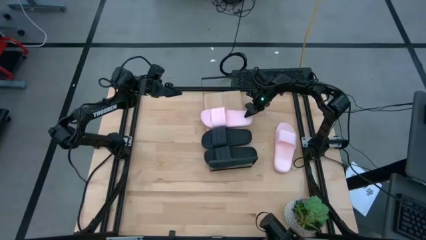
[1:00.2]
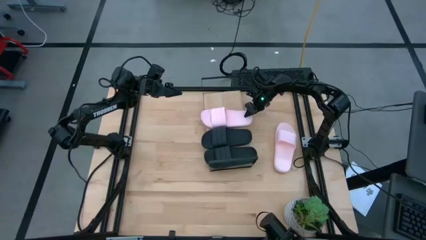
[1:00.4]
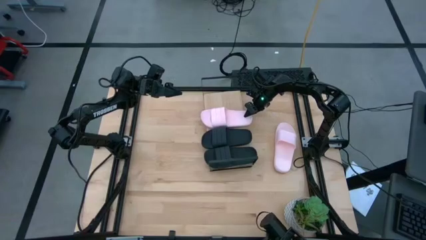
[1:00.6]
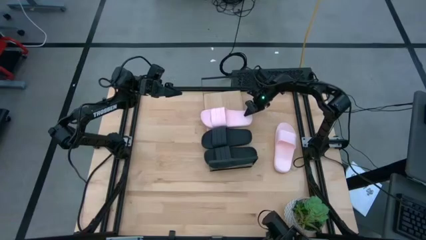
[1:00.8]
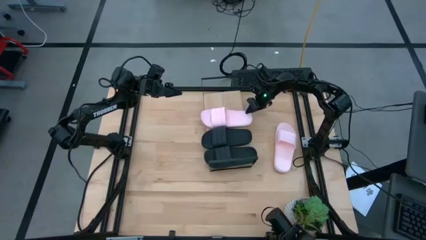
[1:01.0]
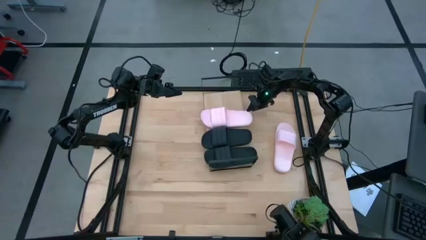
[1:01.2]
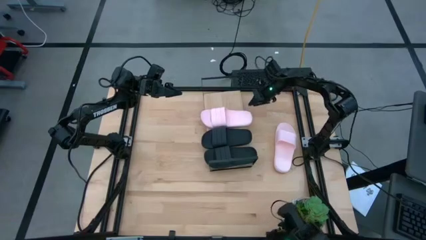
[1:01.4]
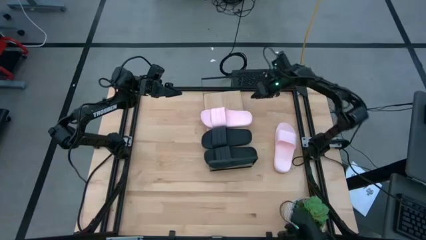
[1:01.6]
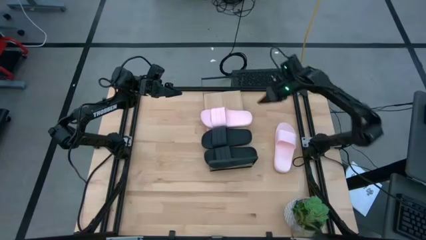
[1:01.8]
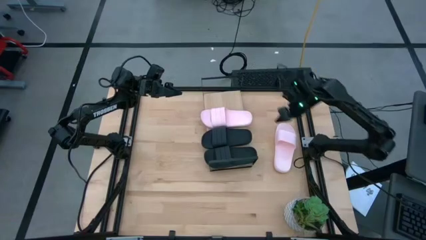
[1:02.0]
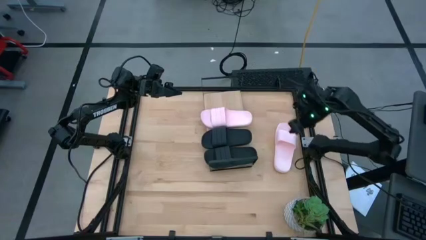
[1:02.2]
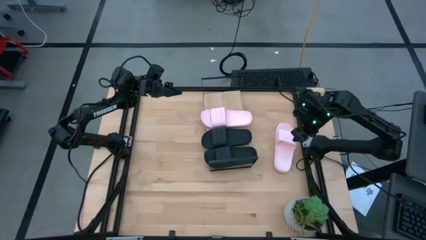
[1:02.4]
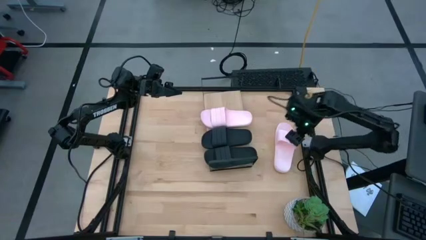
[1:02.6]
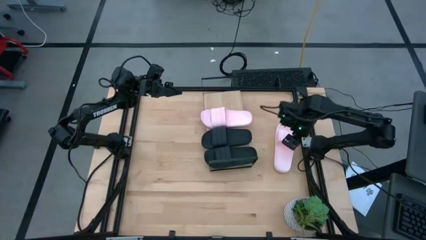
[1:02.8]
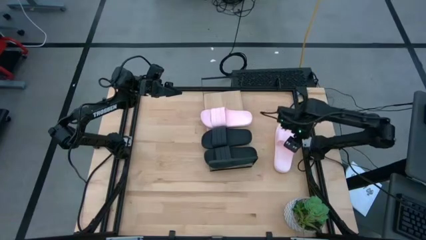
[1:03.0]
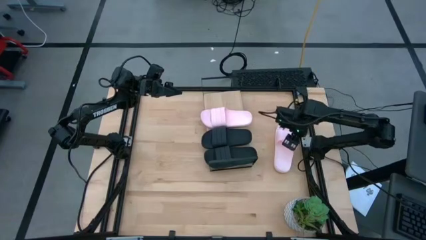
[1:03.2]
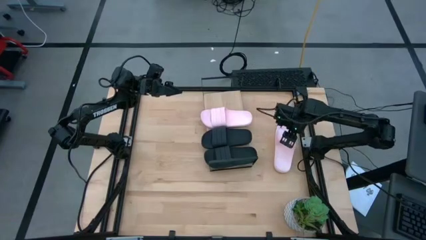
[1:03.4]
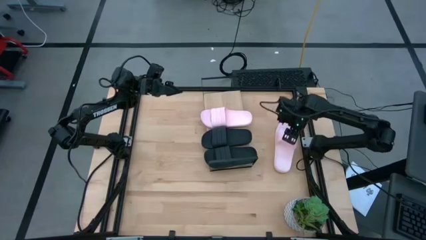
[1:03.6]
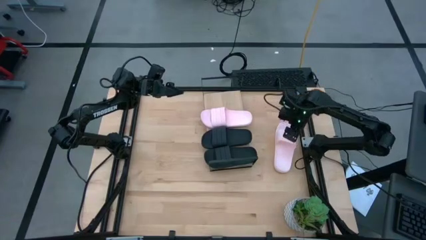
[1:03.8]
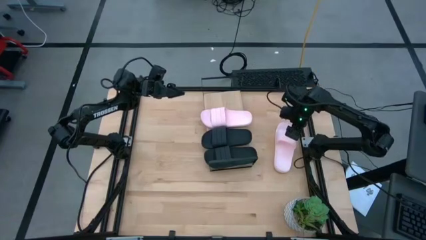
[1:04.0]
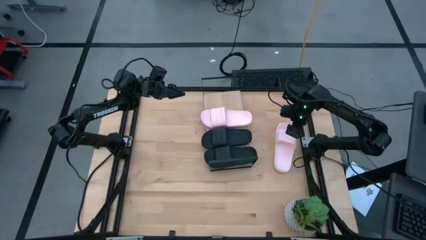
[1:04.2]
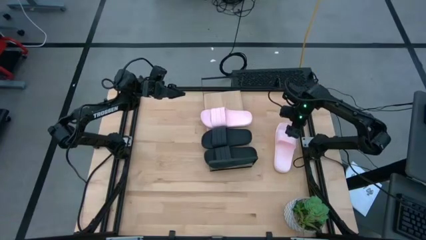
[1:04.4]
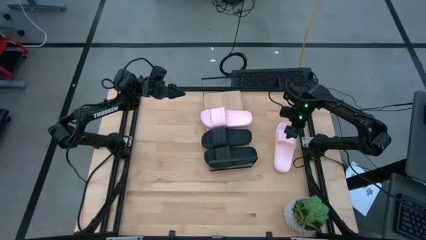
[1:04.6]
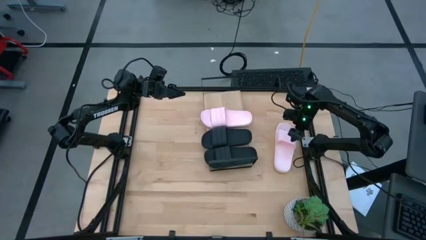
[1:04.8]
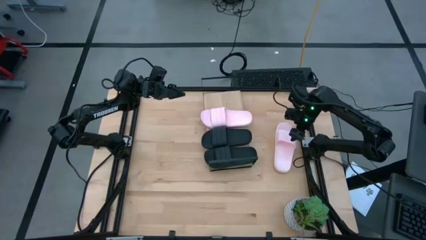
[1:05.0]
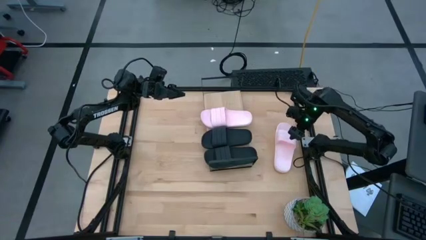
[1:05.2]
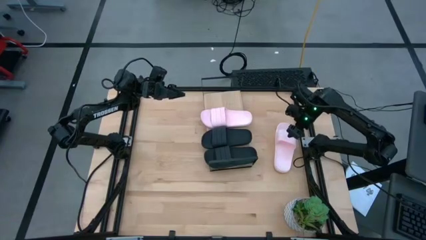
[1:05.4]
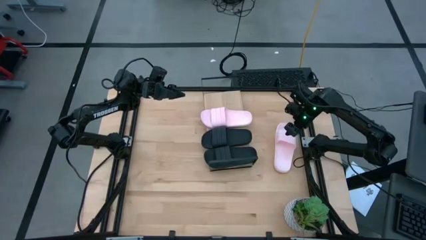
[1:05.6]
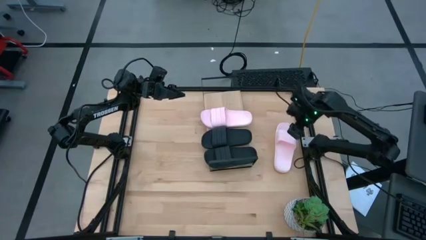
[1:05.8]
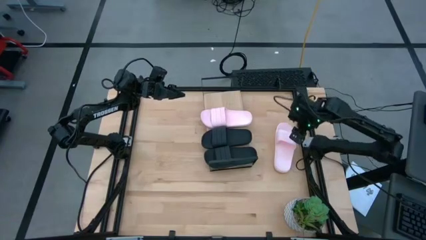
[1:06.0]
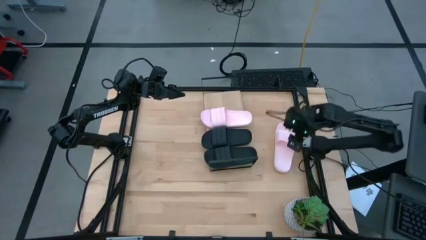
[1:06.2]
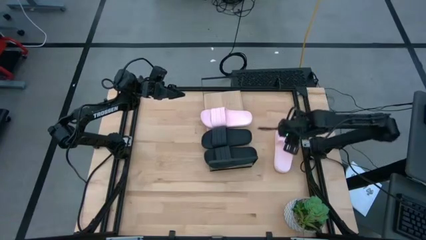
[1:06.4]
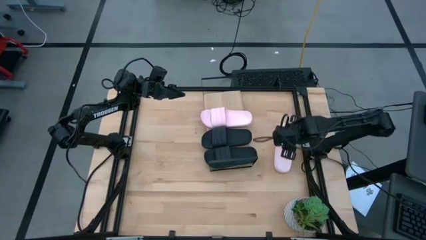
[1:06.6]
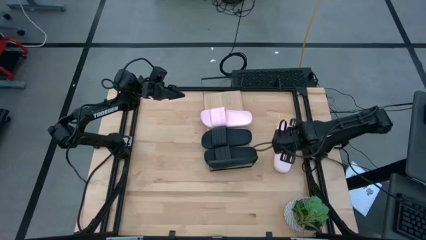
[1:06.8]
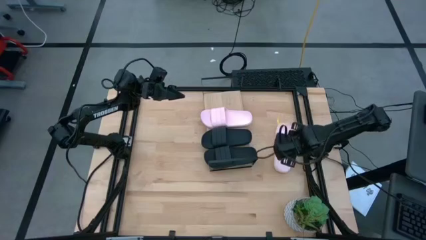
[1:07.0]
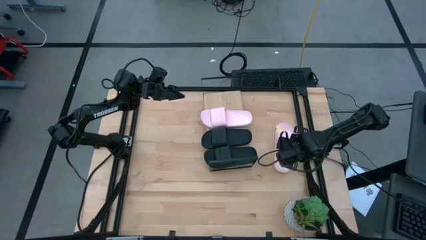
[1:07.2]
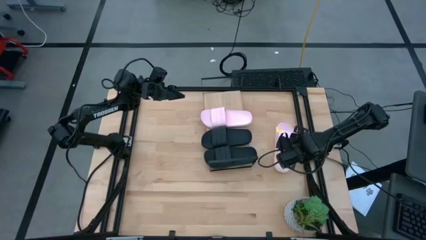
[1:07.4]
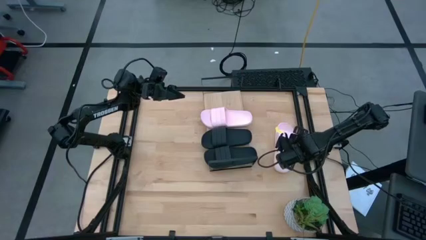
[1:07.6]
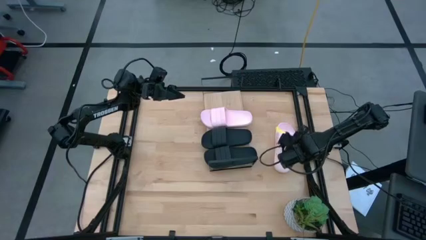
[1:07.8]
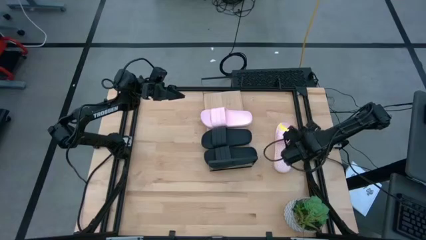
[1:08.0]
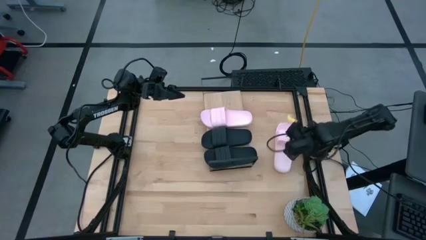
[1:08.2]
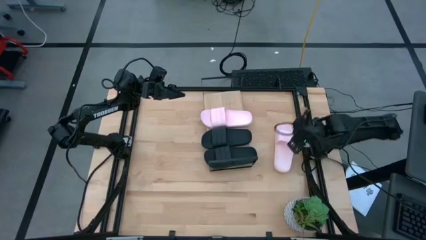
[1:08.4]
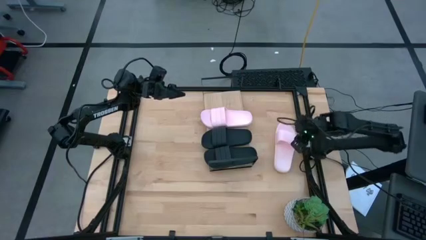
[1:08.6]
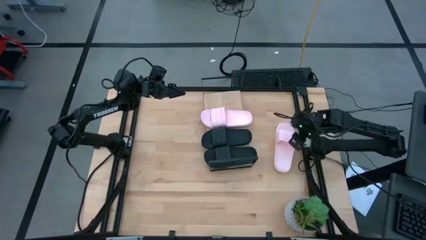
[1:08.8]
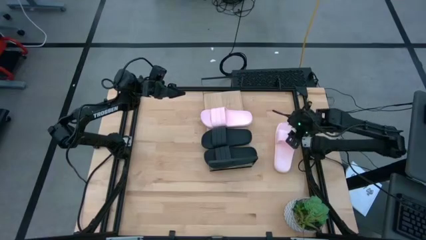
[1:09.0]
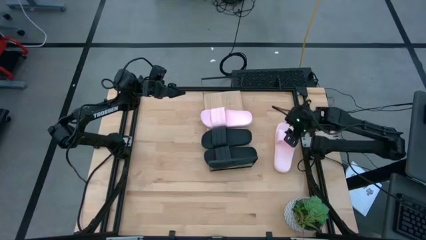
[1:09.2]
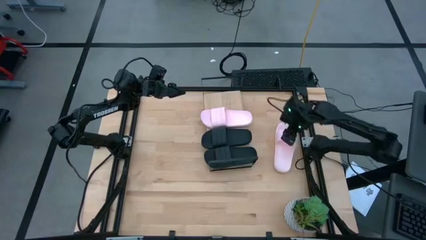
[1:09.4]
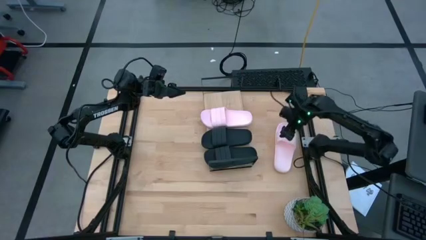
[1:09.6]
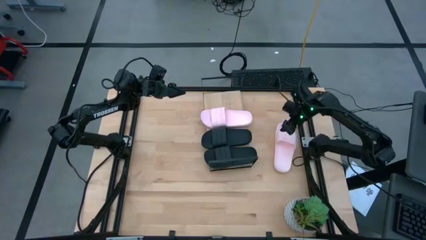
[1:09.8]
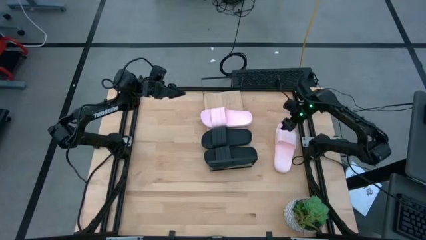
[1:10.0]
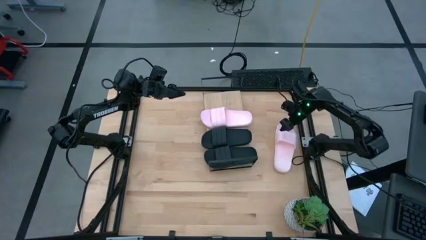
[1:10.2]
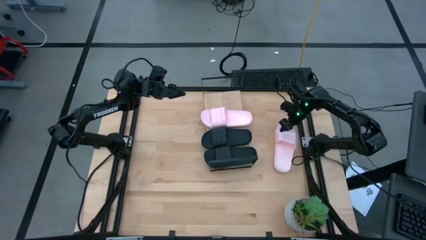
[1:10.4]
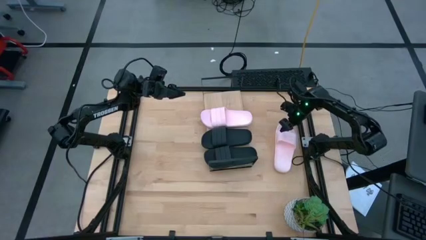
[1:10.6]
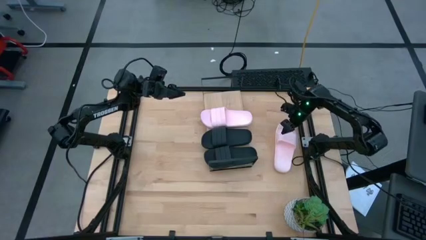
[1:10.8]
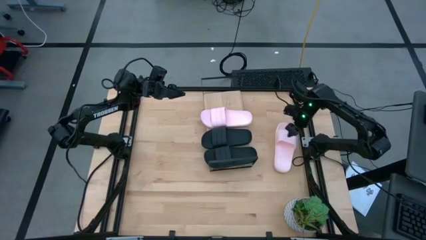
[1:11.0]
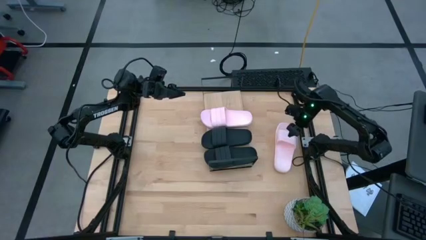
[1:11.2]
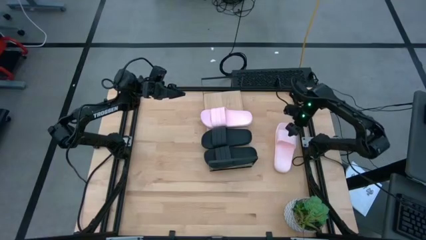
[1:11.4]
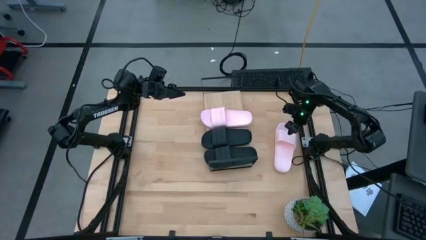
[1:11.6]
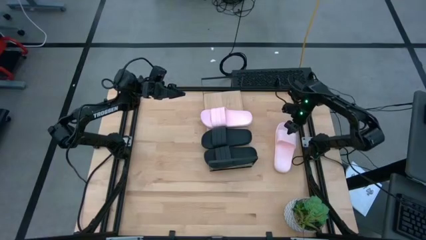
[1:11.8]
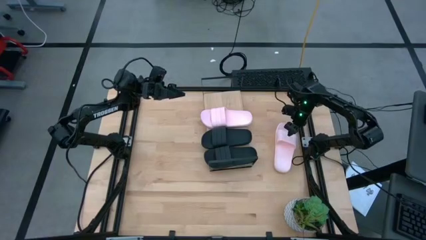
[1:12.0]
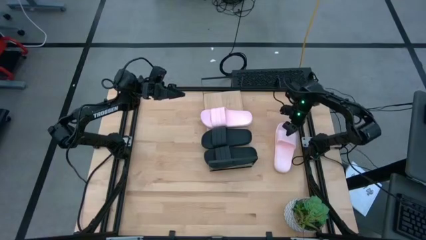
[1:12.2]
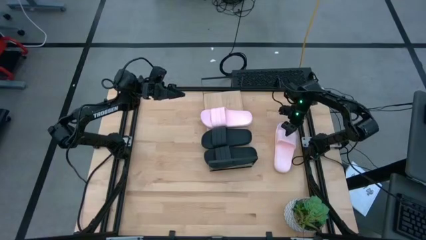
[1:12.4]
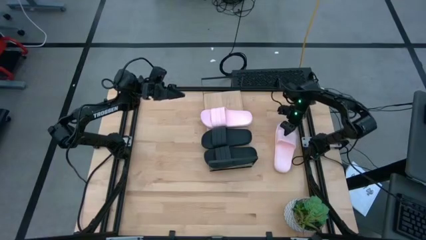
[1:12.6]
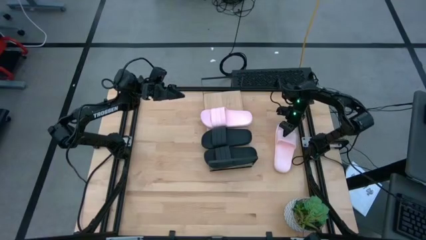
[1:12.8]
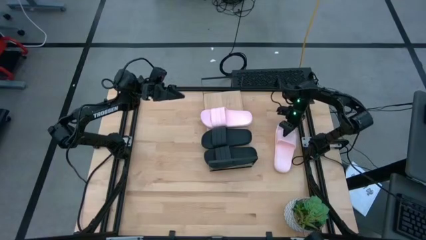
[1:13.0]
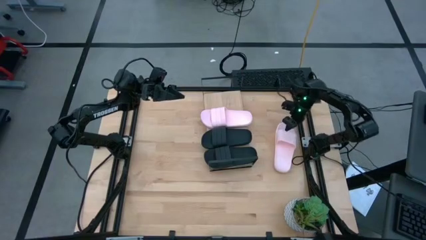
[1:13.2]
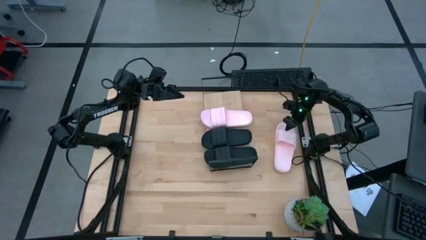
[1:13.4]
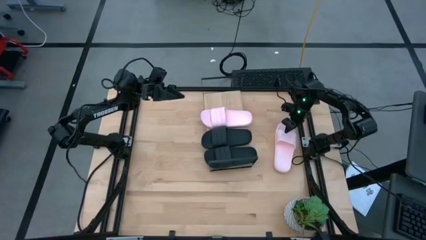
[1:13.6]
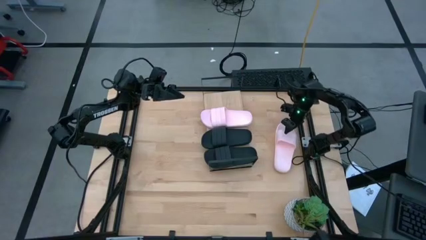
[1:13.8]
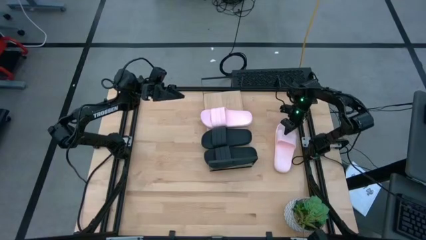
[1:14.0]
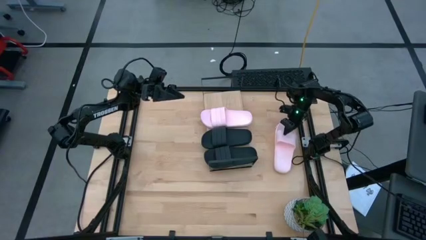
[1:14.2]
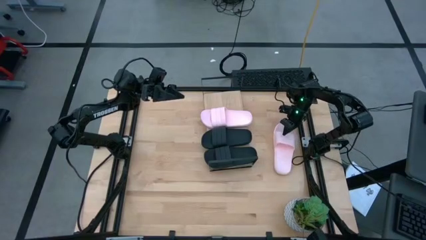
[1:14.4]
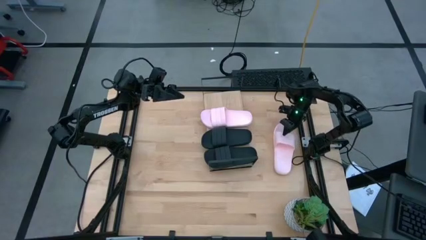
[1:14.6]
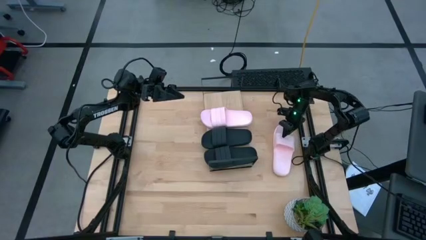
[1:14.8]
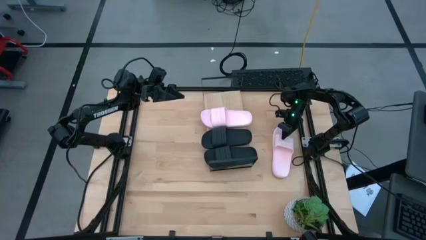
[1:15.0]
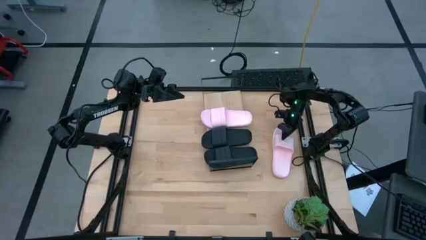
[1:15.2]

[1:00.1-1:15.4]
Task: Pick and place slides into the shelf
Put the pink slide on the shelf

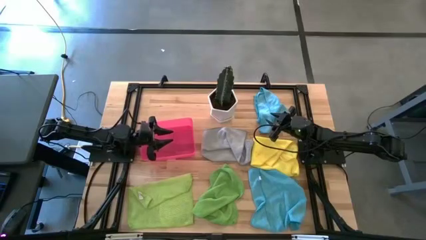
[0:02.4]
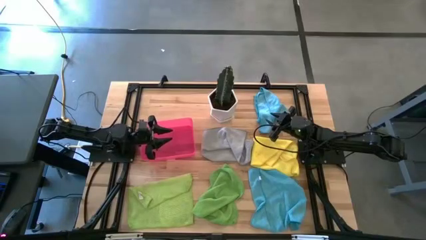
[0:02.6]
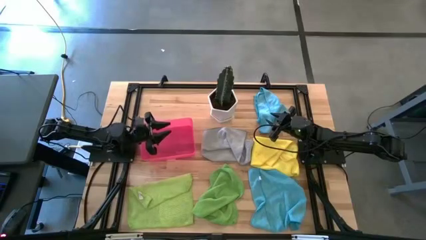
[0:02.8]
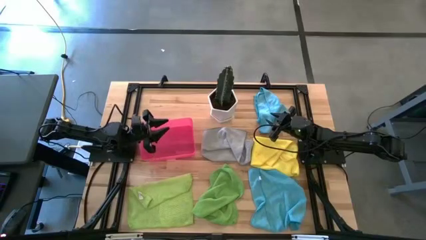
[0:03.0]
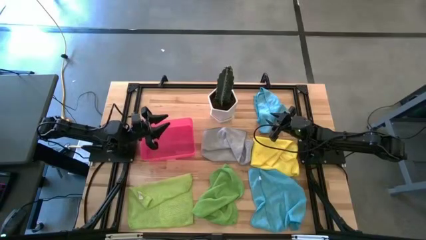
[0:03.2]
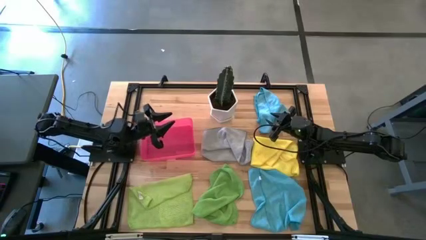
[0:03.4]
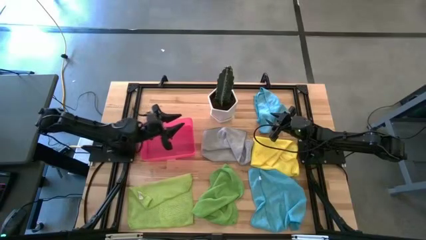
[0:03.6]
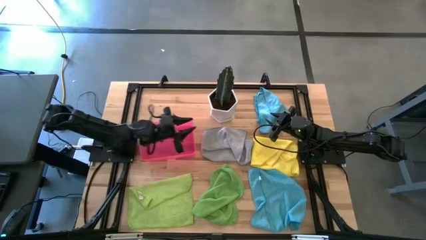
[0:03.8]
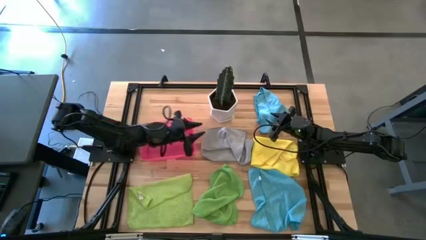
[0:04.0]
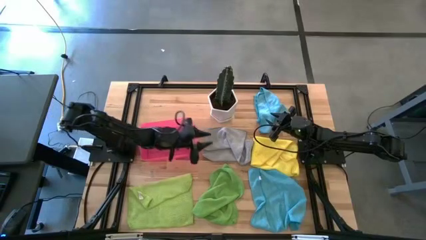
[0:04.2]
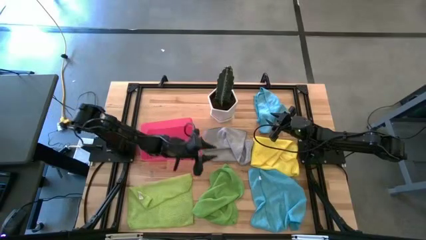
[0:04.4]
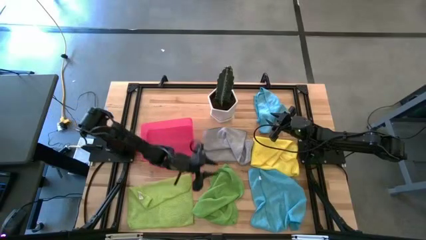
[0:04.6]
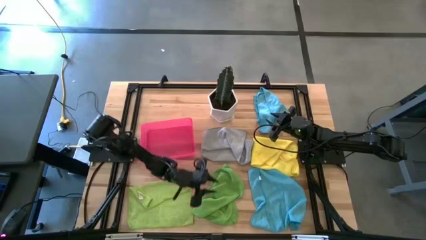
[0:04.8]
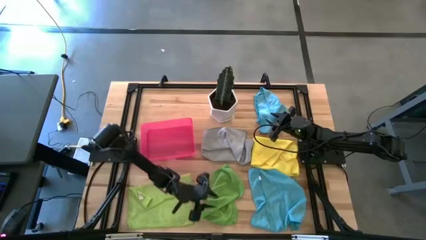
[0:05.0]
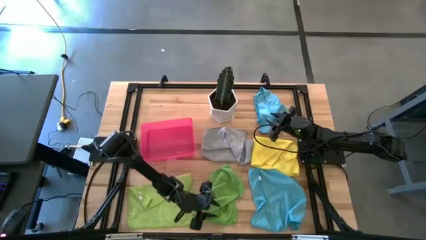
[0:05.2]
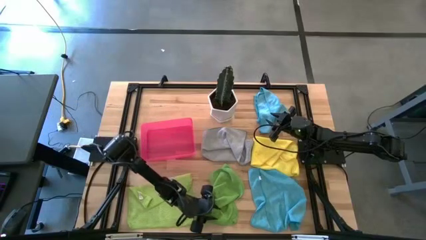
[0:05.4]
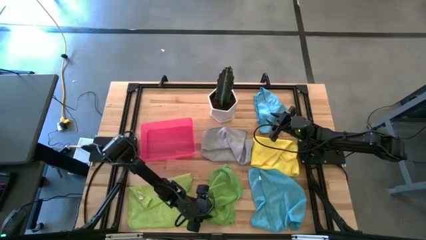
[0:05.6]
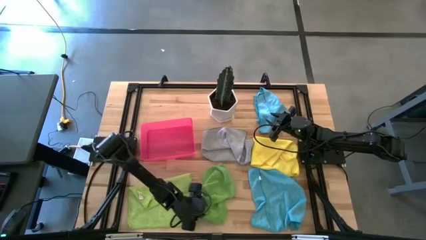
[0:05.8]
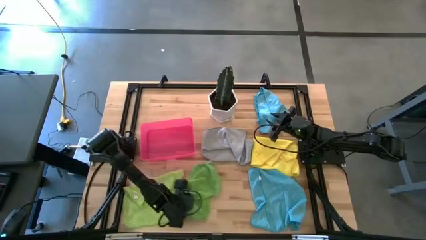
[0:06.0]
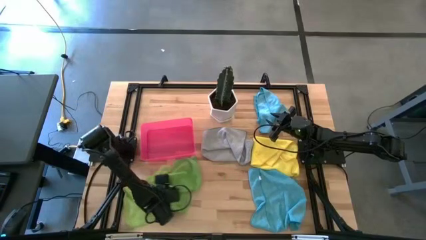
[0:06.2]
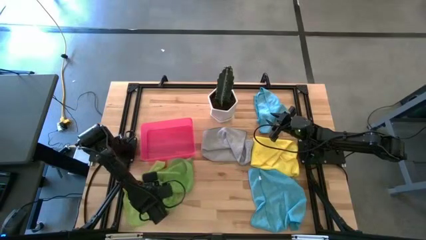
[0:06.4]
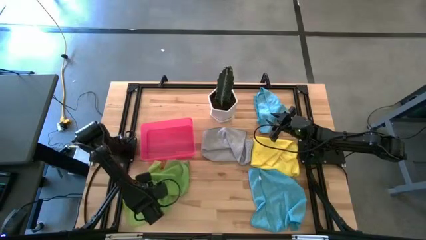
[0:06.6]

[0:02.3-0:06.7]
Task: Fold microfiber towels
Adjust the green microfiber cloths on the table
